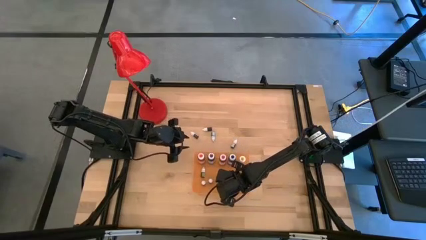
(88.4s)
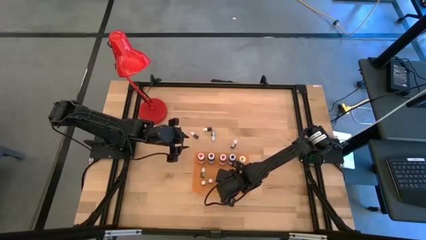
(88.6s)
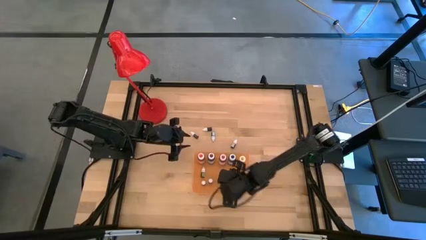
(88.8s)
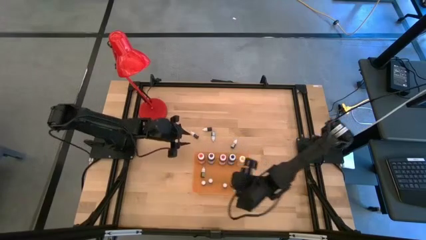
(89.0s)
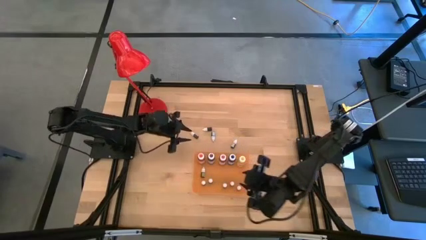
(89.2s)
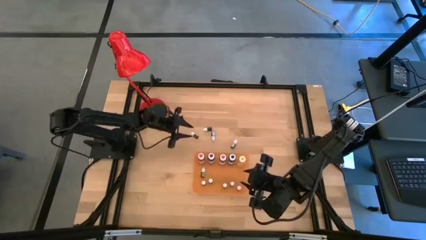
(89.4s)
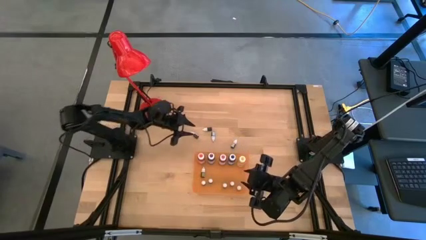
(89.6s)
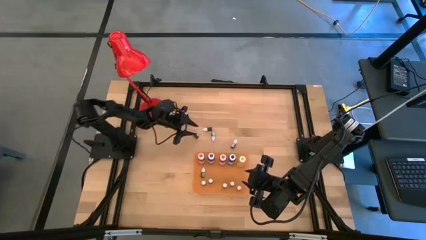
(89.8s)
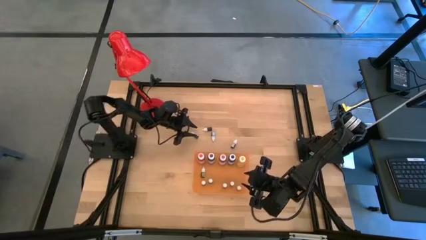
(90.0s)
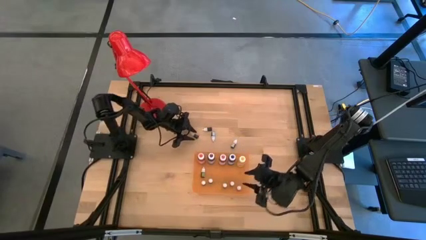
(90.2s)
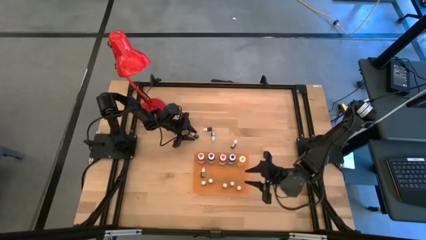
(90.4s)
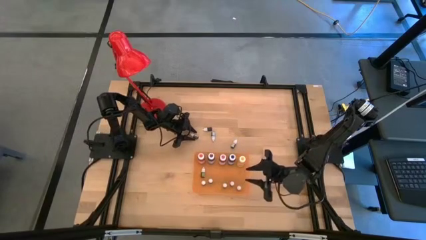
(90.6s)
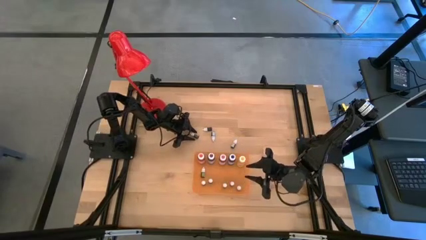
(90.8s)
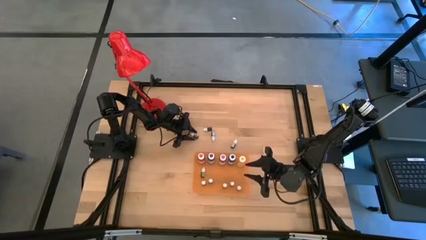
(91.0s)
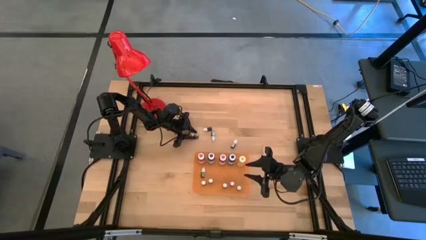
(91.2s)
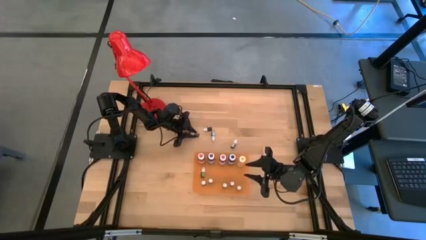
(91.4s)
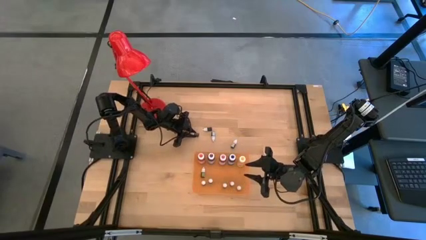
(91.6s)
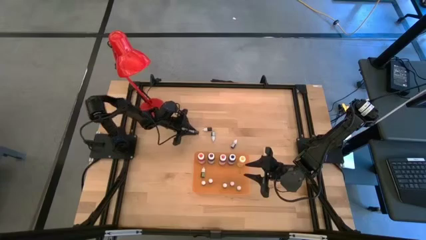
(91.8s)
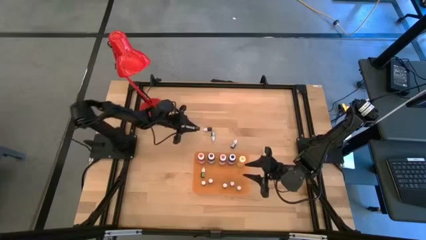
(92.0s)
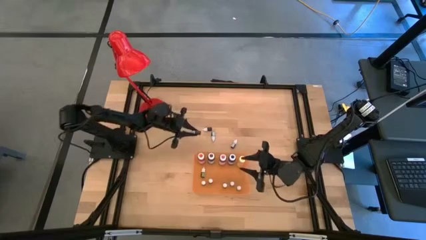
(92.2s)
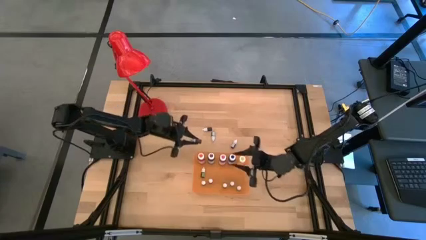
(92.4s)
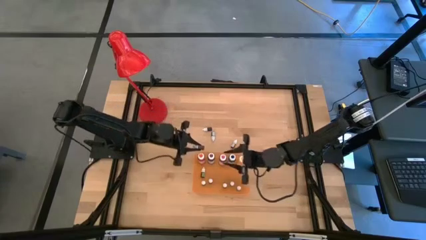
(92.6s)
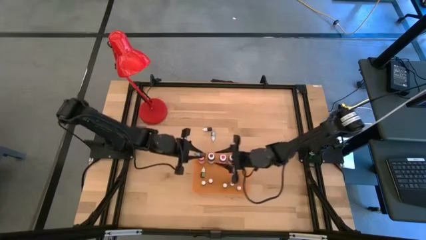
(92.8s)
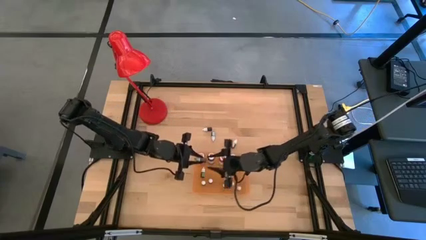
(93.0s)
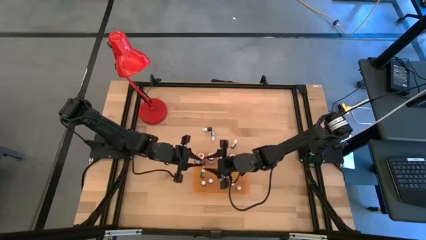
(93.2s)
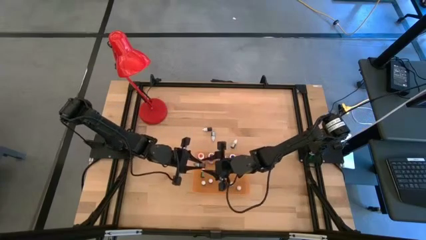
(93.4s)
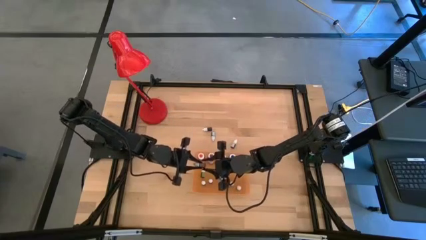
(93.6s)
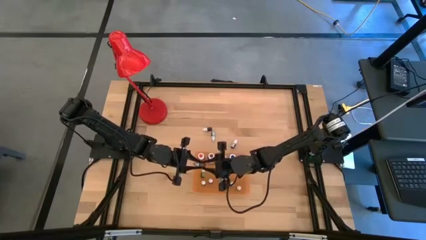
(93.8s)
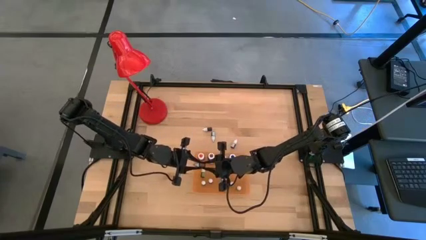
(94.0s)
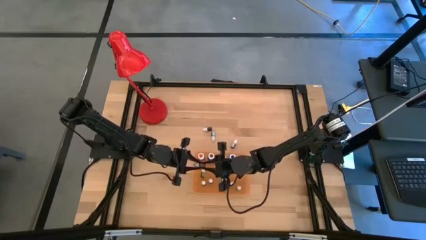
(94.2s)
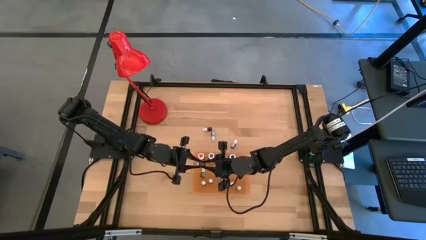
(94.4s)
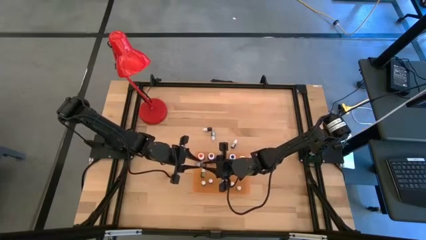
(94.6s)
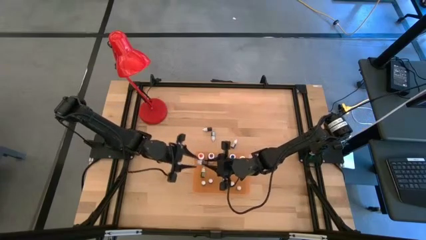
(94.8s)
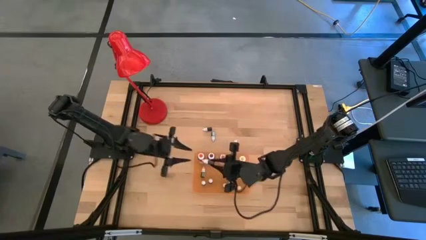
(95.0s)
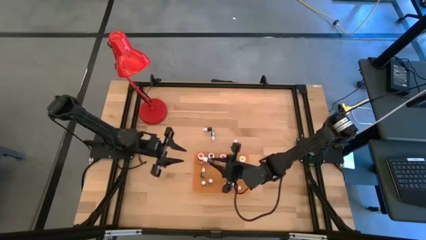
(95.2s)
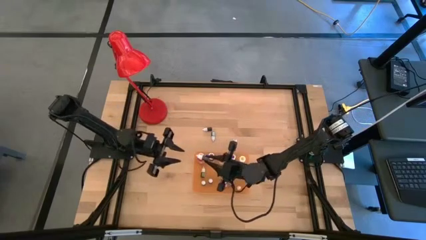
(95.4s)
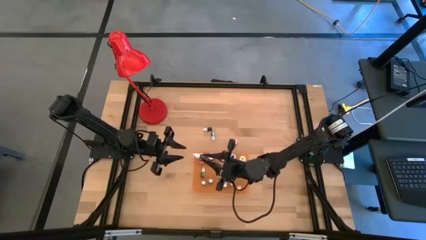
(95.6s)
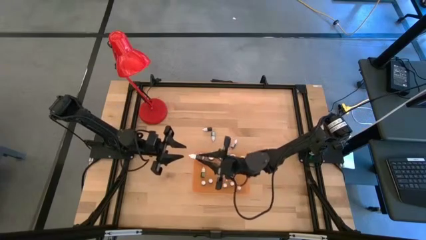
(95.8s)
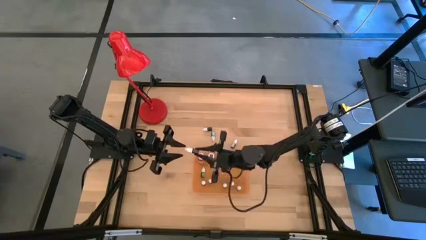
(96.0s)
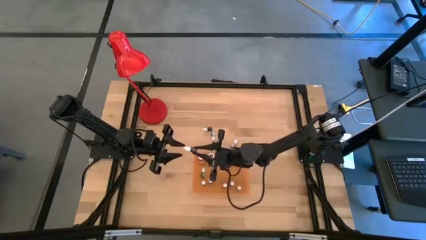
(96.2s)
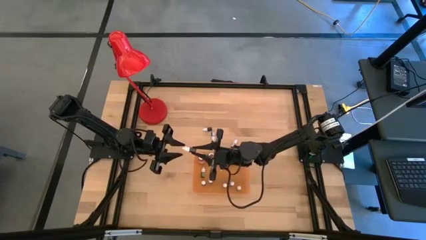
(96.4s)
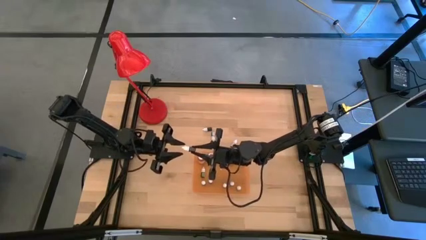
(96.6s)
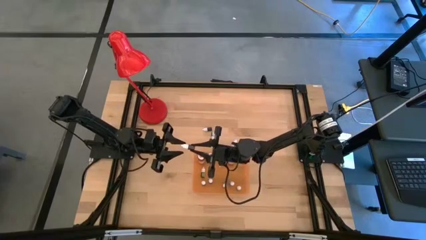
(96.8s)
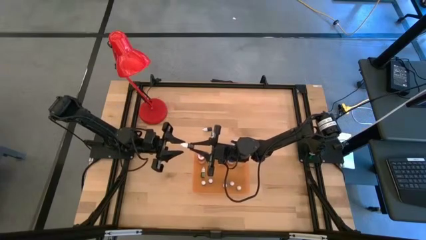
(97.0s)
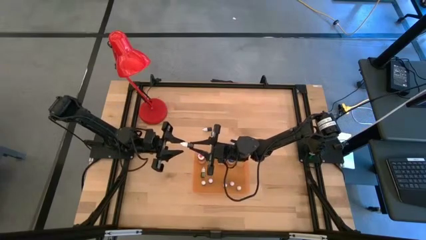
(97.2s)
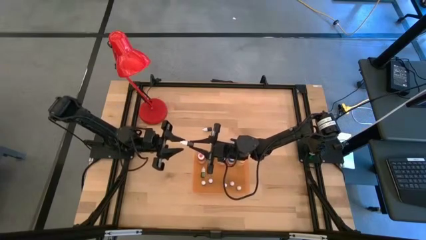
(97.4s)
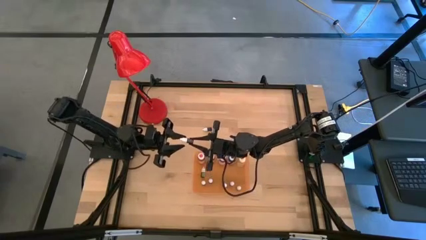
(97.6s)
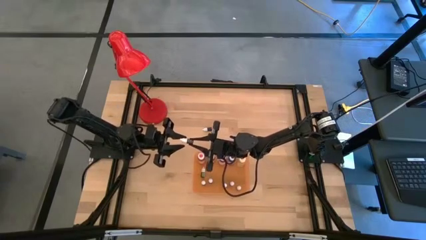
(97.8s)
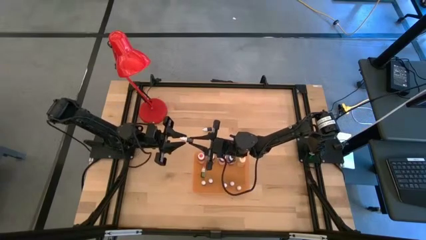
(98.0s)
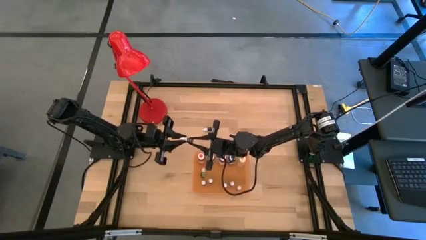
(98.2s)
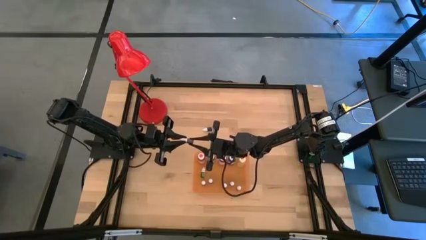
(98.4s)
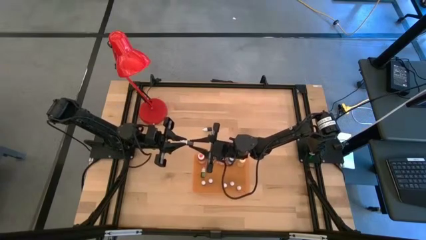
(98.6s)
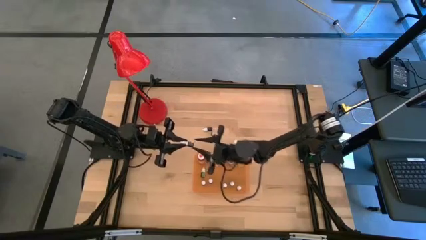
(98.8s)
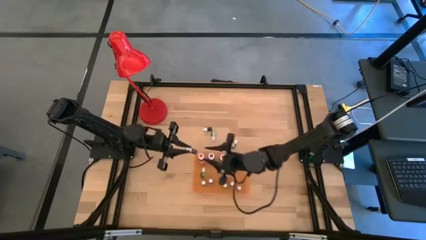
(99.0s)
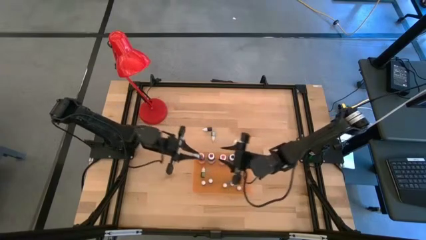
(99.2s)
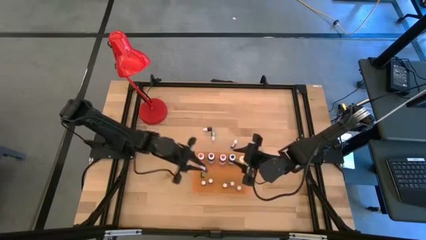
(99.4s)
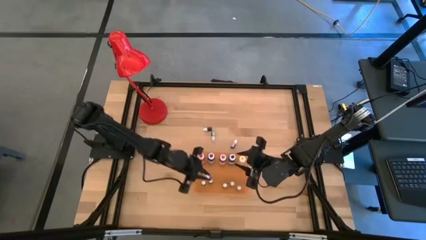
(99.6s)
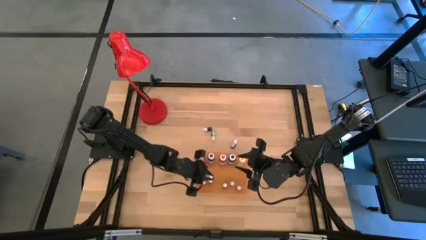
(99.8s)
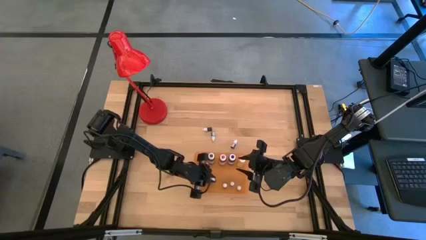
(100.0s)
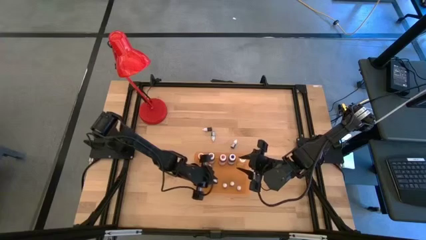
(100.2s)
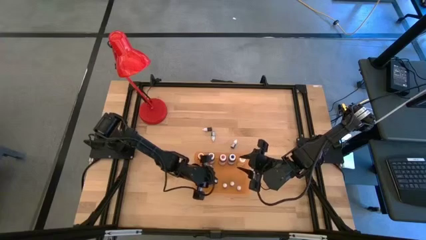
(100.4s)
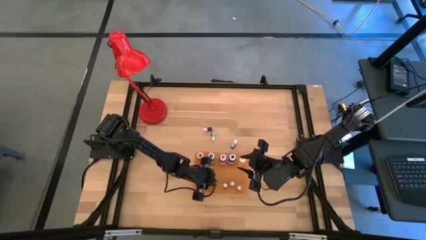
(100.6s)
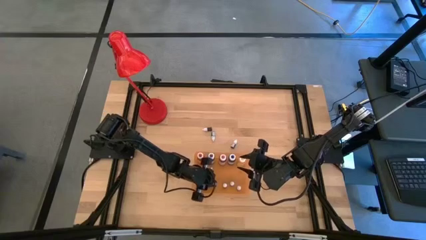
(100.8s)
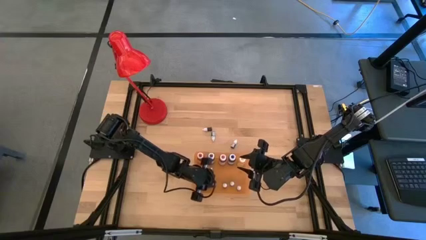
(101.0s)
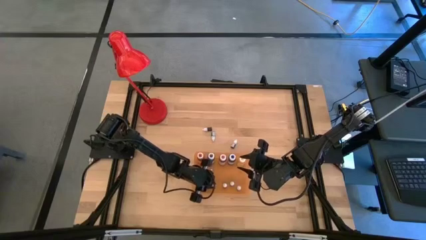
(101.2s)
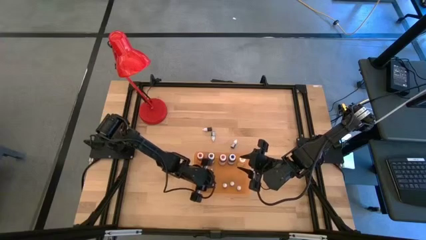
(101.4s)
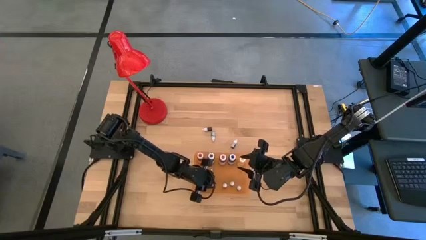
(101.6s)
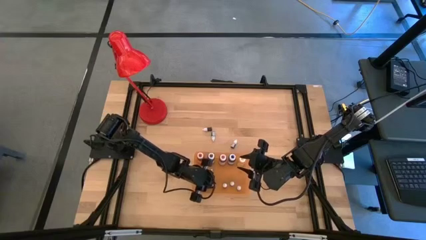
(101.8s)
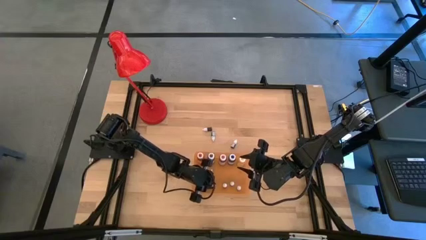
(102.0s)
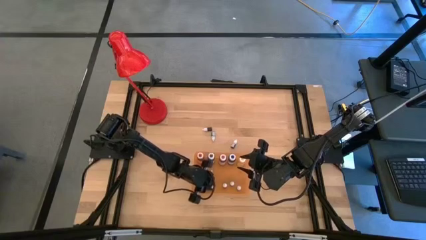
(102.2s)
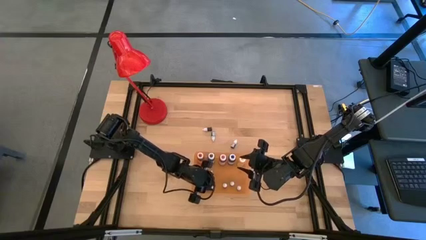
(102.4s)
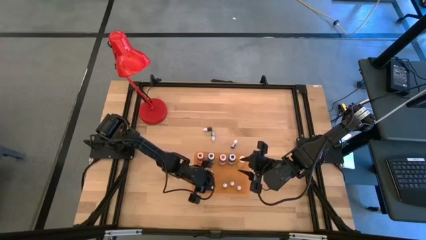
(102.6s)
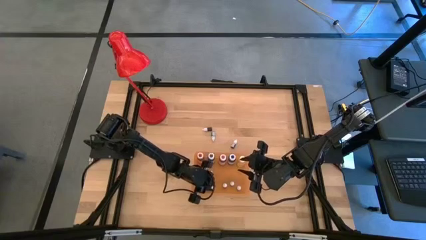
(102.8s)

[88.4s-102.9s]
Task: Pick & Place food coloring
Put the small brown food coloring bottle into the orange bin

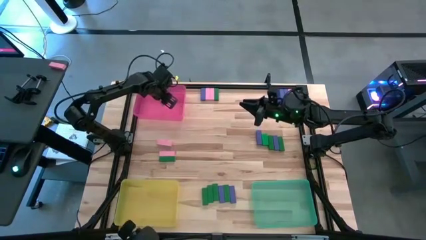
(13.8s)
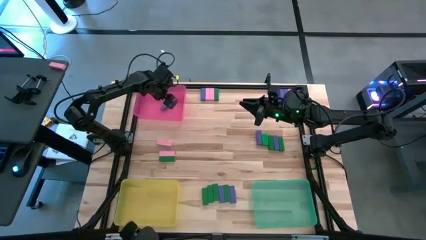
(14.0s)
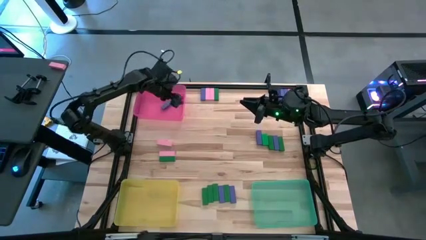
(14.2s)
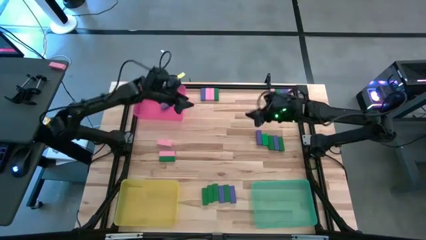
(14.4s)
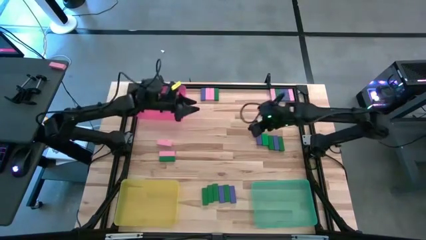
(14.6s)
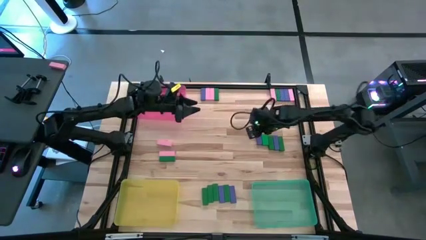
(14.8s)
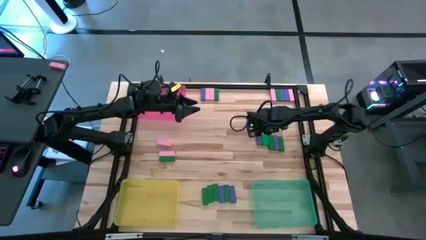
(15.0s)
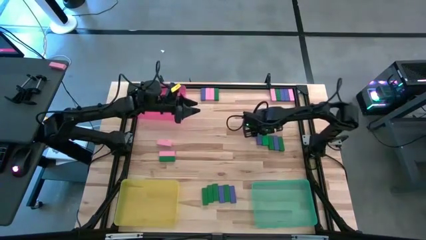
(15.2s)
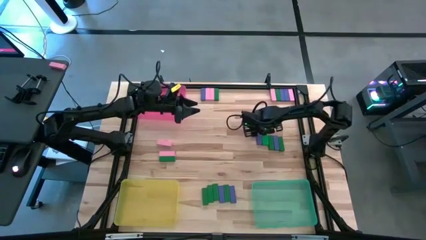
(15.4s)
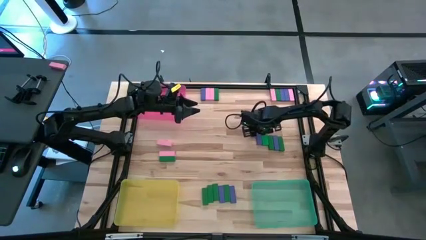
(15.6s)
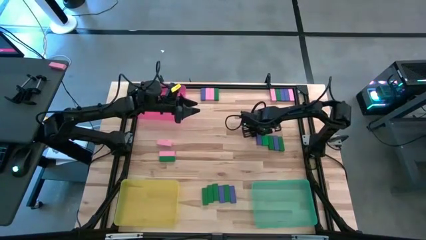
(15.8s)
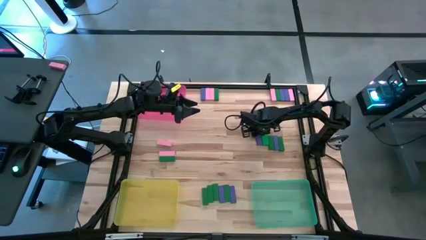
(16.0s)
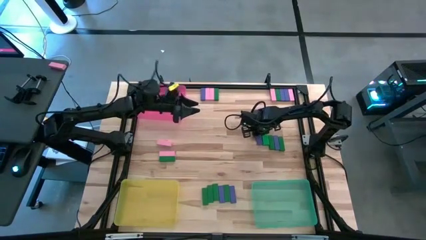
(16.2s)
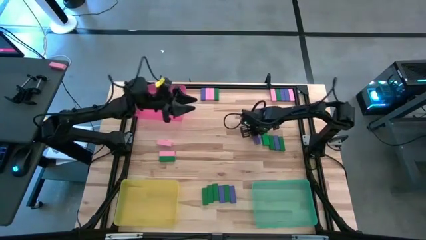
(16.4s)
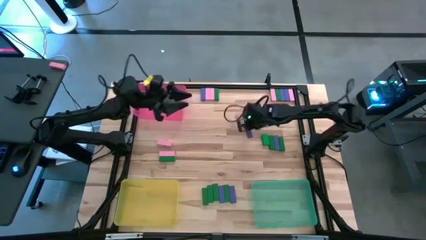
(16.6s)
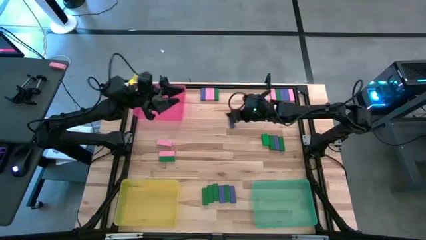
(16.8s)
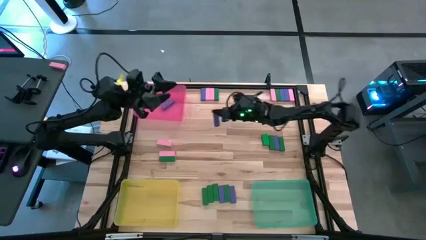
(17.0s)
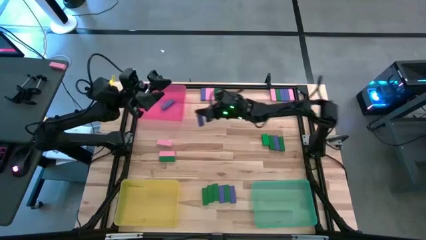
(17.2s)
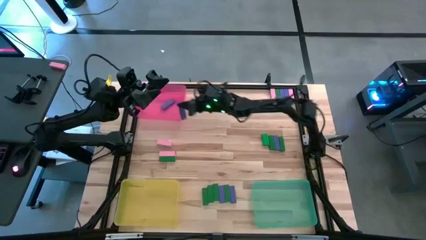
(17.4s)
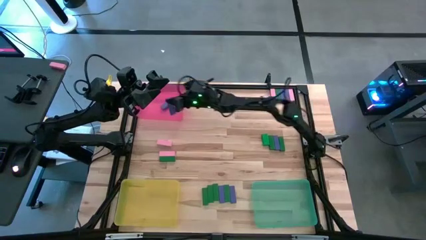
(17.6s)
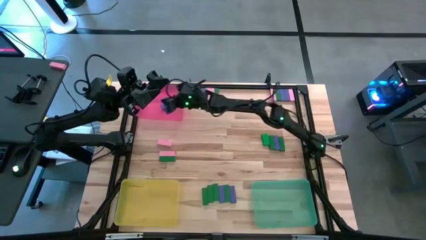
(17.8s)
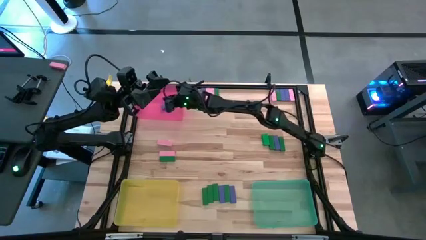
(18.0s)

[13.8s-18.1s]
Task: Sort blocks
Put the violet block into the pink bin
